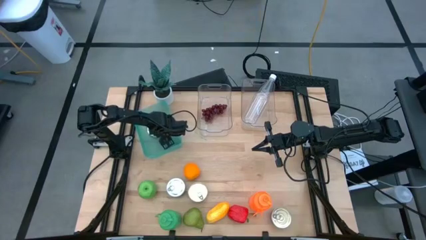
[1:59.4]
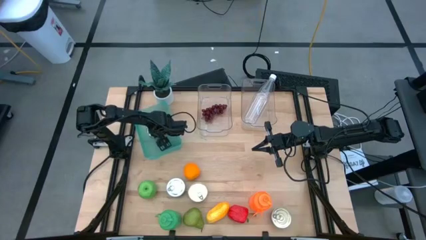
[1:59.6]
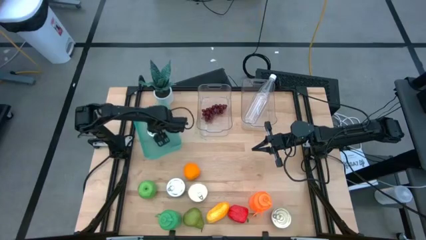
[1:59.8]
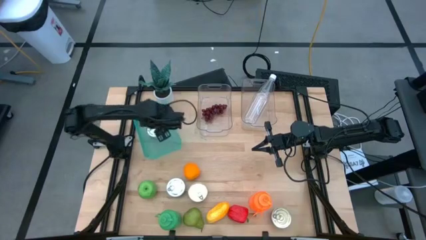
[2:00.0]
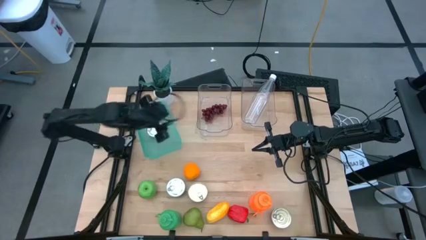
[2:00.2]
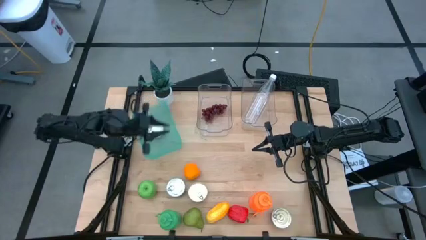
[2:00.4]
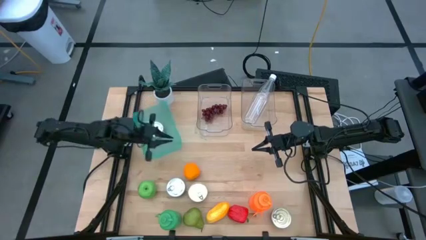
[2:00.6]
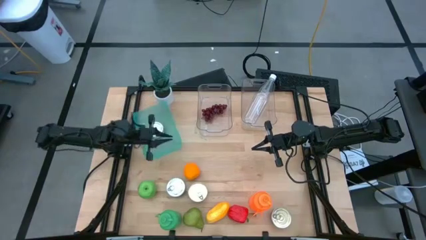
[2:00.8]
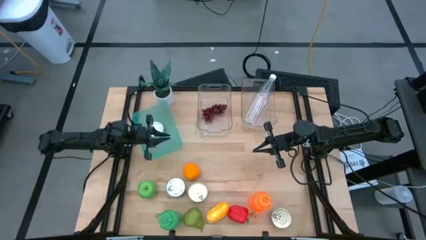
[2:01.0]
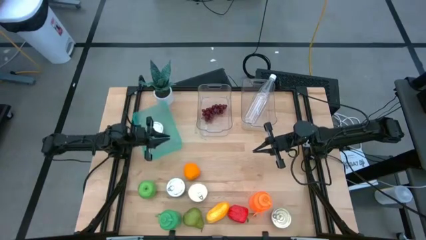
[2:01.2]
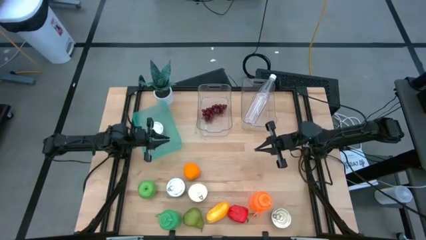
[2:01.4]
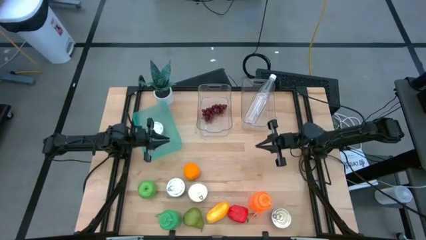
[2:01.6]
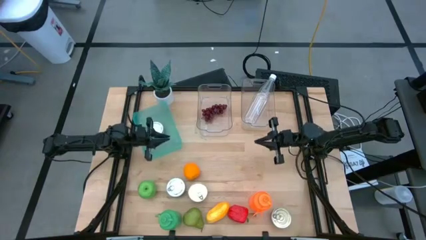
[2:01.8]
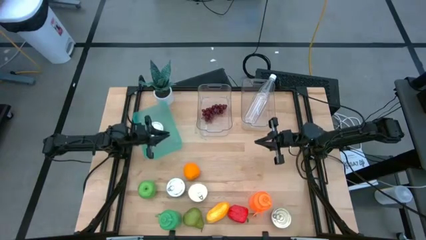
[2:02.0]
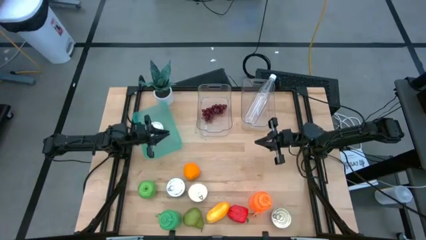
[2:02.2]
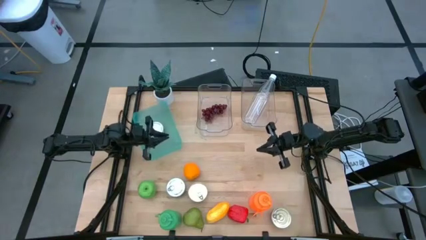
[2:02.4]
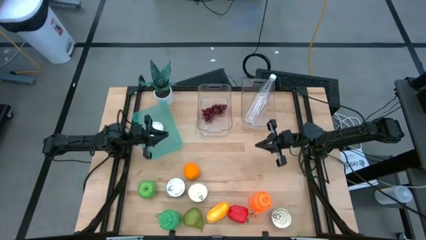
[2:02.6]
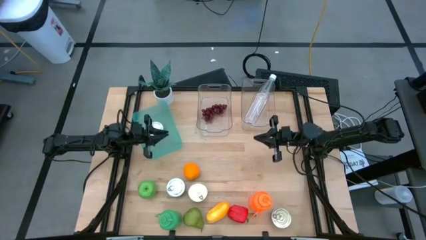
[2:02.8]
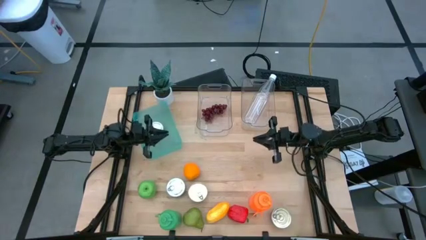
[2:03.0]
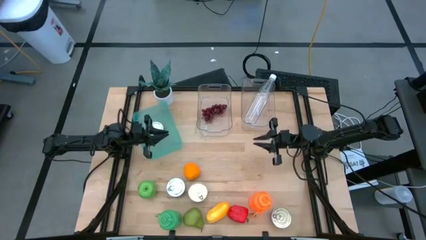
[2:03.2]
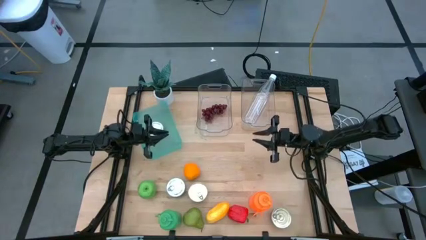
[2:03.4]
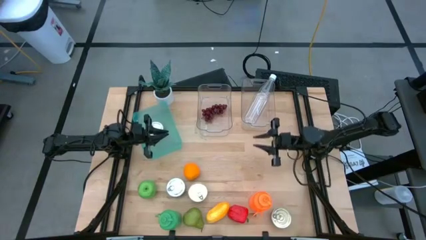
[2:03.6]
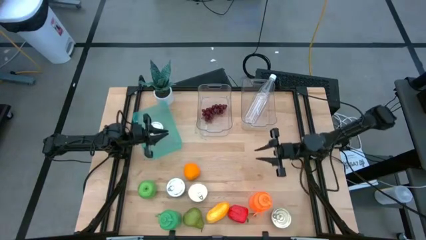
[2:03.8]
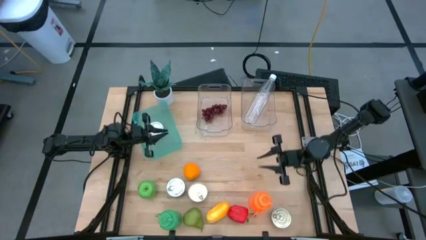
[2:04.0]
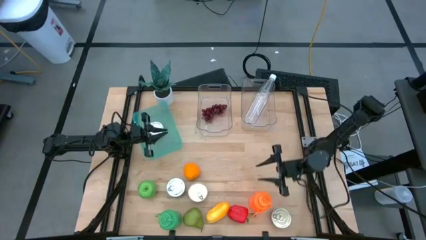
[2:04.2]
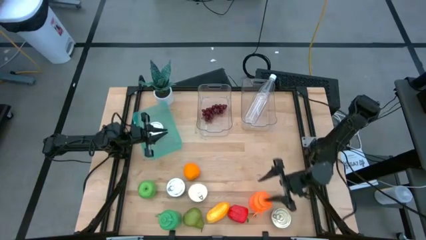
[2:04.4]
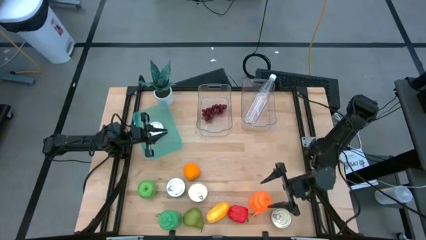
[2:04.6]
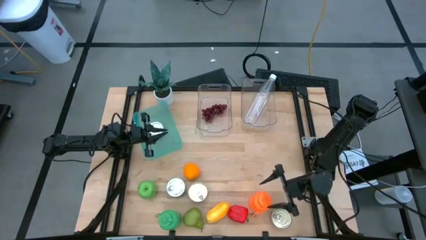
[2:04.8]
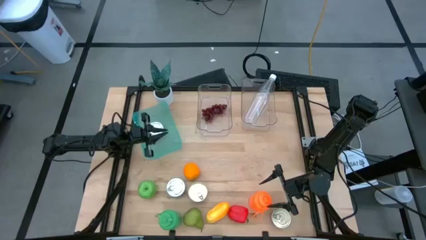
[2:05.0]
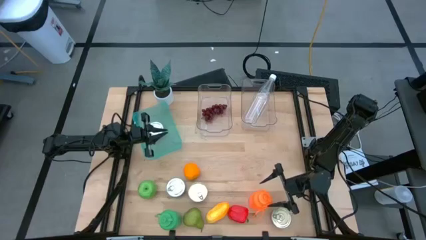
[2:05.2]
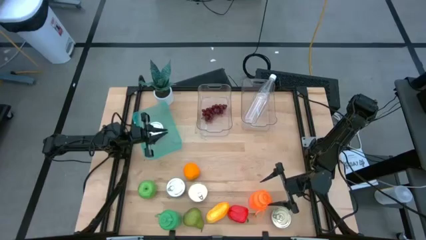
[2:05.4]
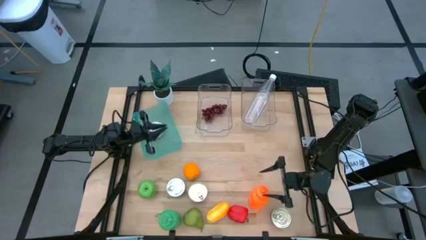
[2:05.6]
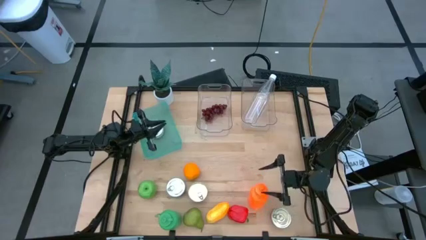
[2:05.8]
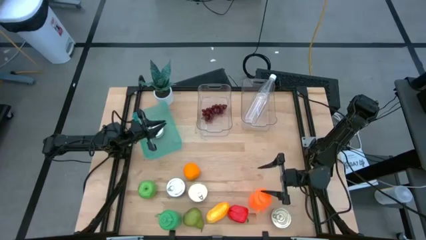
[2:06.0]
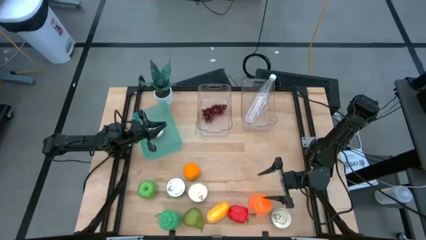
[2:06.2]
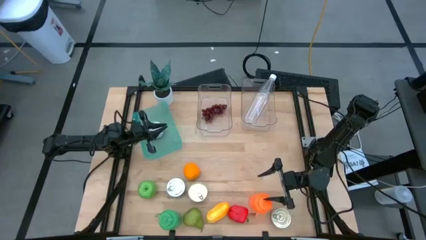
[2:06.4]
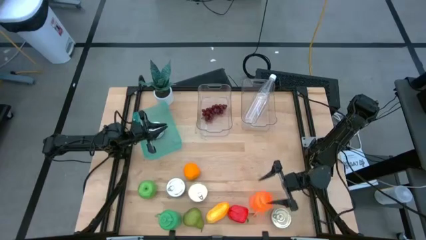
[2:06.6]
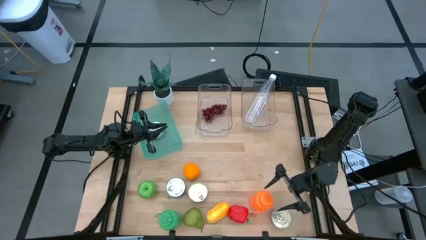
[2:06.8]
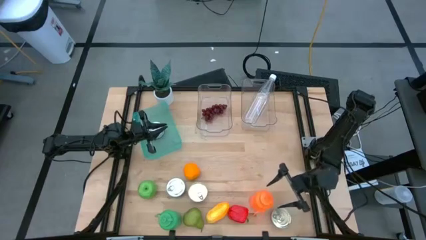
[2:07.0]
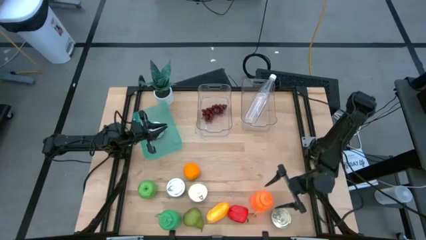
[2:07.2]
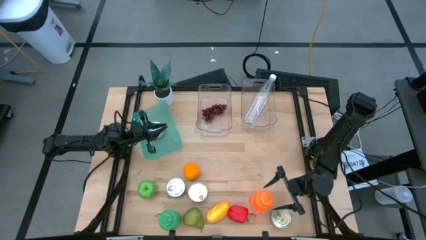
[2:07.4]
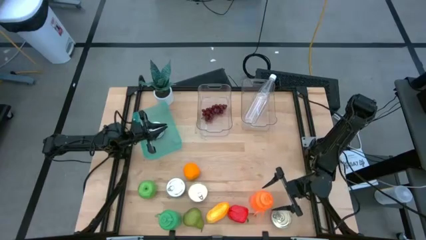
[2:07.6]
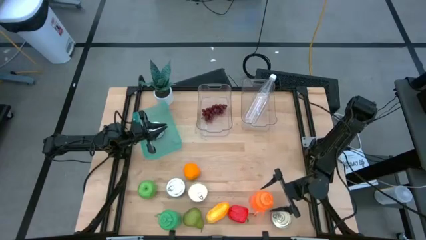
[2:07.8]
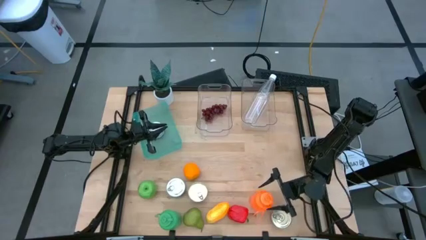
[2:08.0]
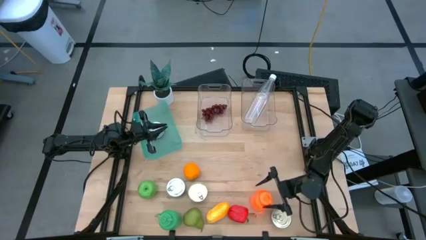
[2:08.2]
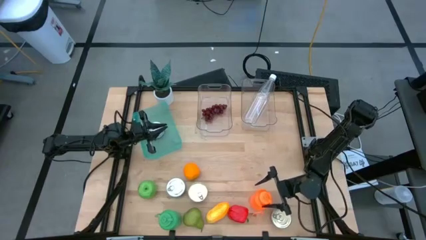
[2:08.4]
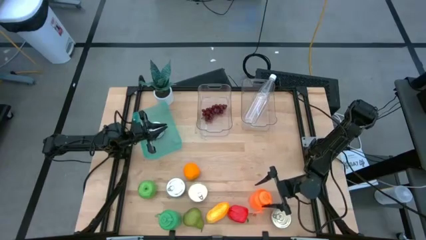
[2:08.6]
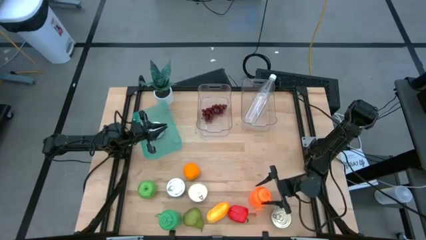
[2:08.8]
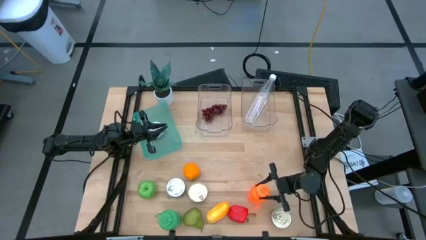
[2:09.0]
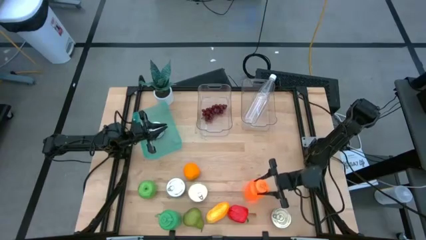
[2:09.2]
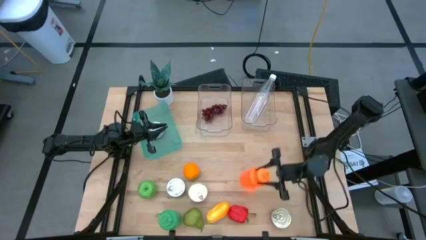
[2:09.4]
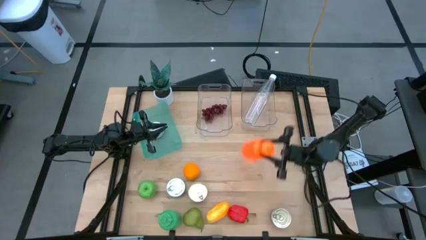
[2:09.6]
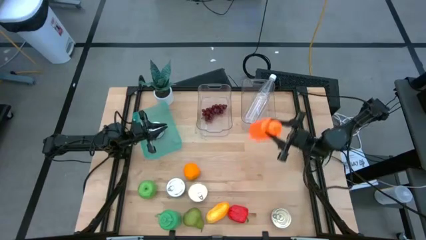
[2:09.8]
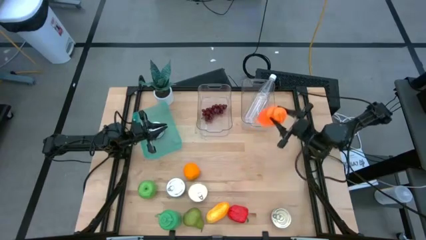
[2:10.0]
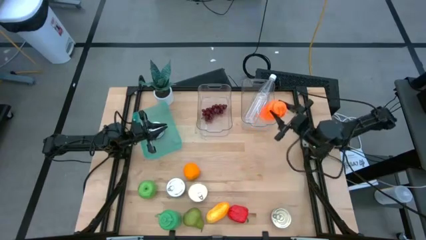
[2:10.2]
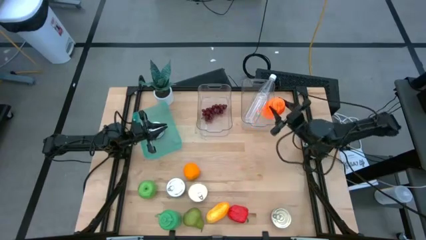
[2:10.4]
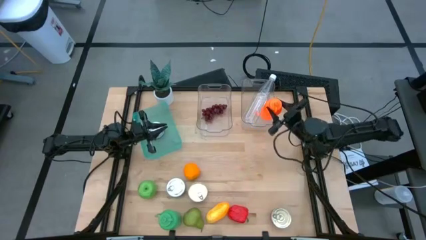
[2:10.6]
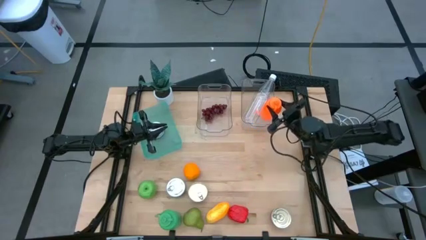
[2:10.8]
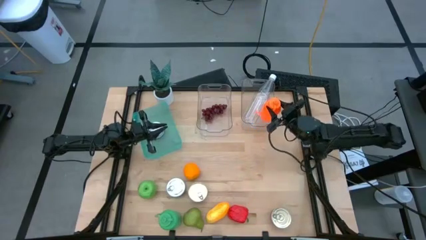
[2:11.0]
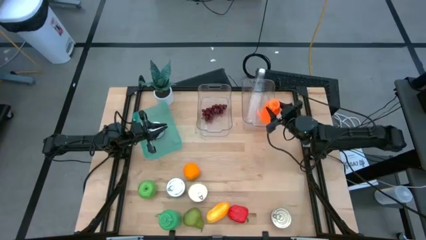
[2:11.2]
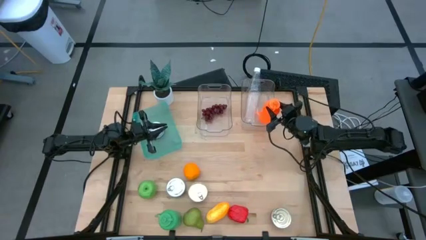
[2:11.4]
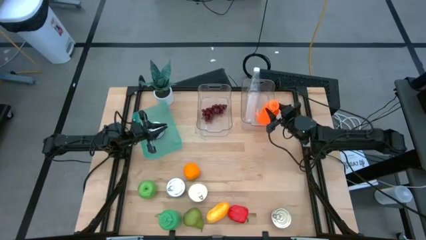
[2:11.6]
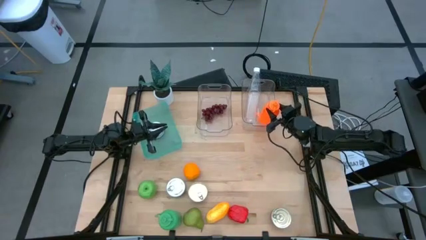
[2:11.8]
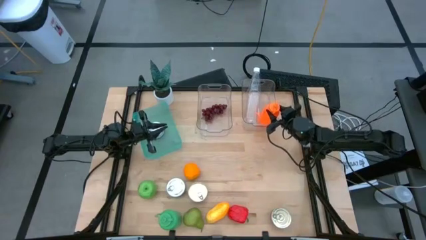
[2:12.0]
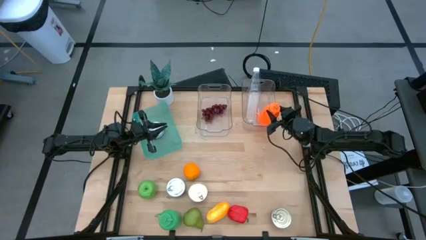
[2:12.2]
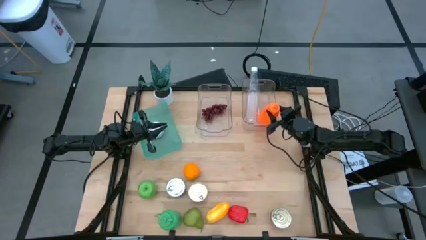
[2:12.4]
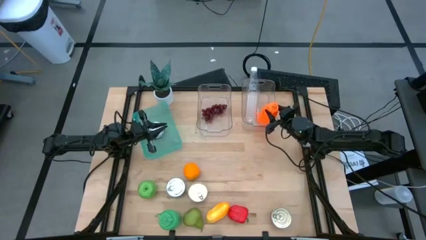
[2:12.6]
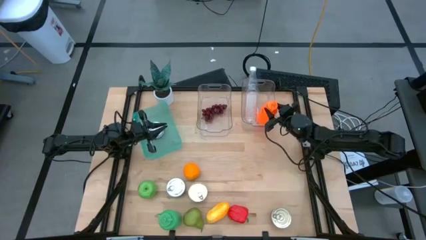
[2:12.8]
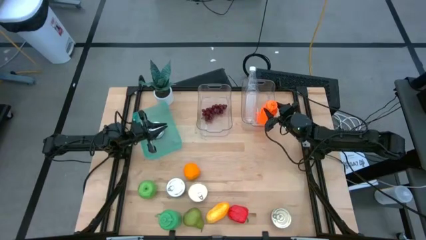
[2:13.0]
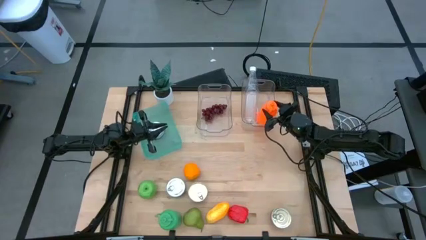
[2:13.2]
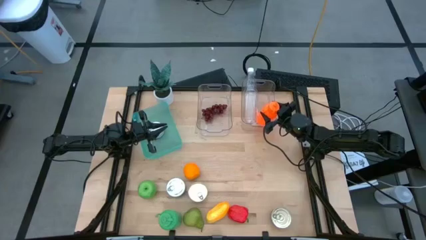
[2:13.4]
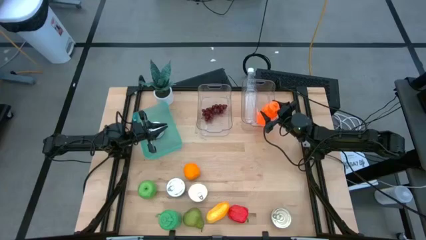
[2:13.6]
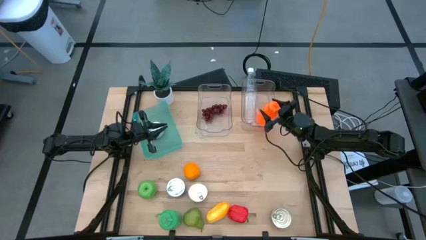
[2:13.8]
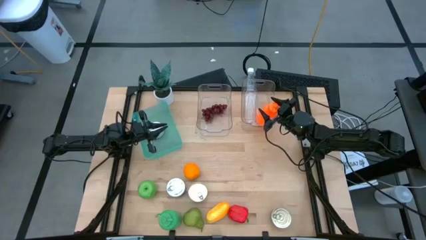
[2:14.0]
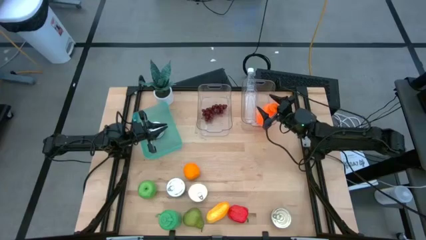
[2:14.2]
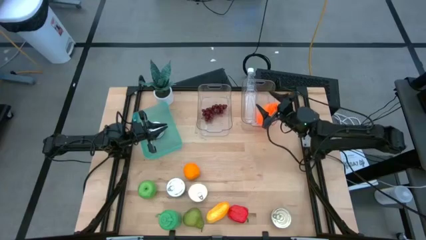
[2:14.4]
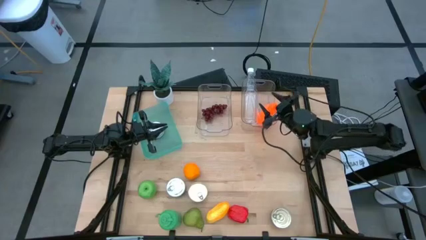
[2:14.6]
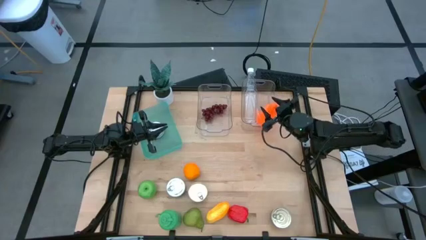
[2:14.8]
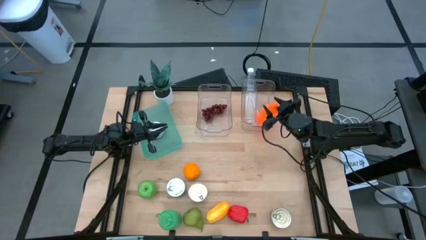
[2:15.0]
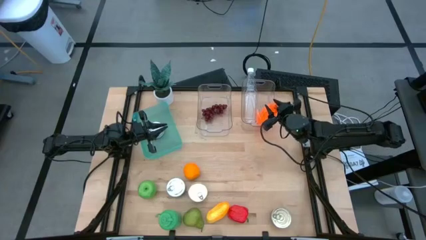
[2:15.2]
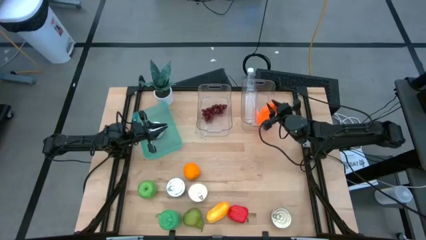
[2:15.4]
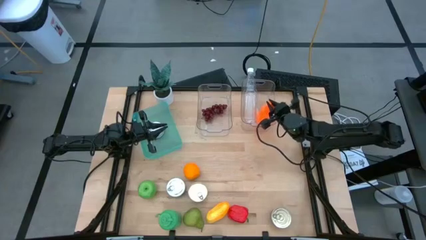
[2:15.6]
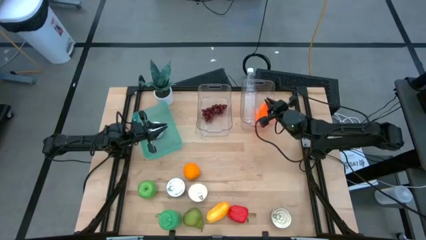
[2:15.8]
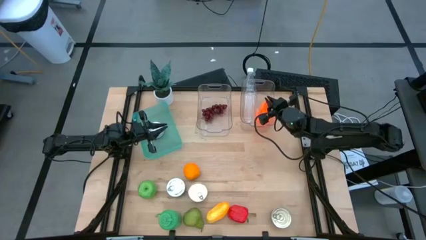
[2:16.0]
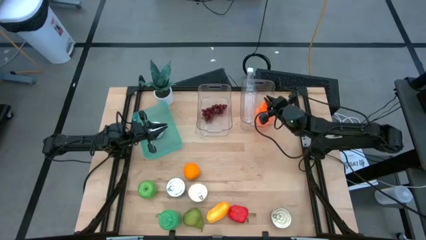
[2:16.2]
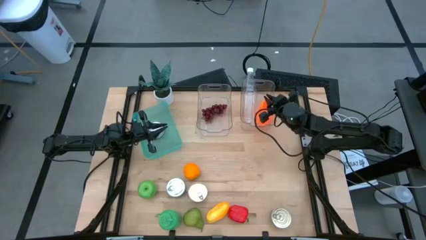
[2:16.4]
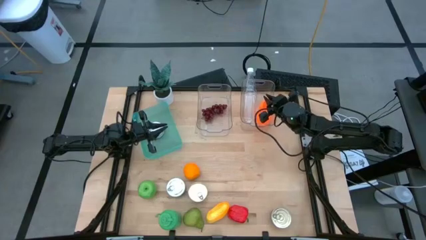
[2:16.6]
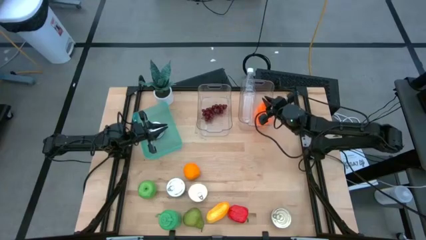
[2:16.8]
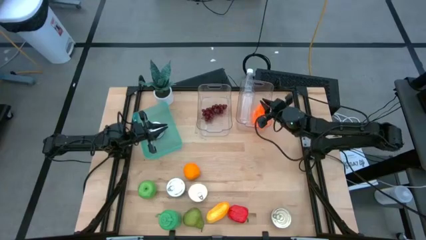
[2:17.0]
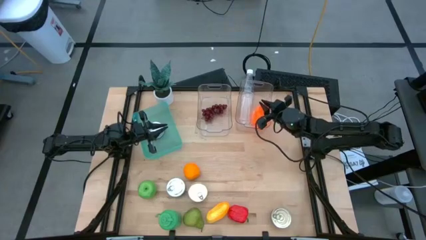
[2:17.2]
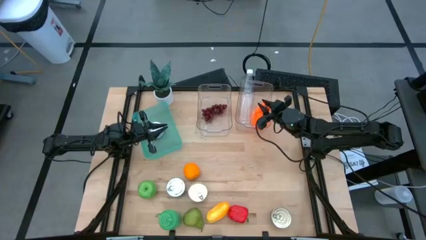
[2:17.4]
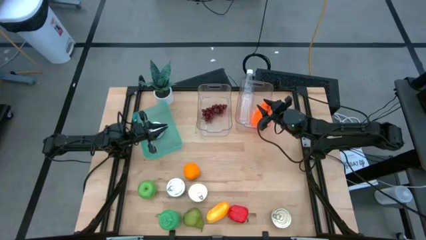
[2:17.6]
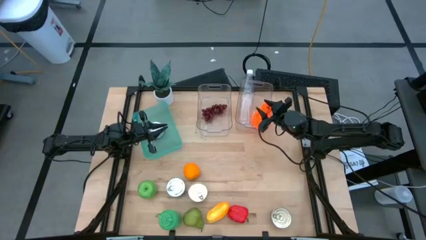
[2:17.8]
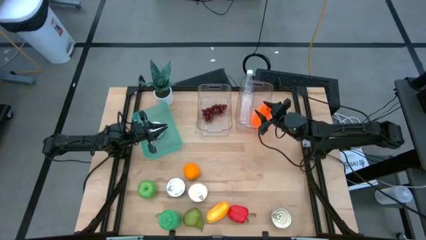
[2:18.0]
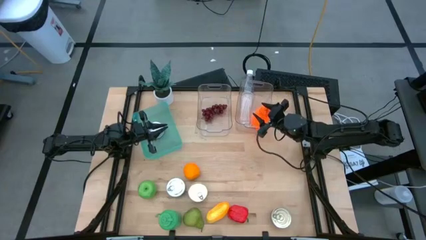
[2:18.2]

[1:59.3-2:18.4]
Task: Pick & Place Food Item
Put the orange water bottle into the right transparent bin
